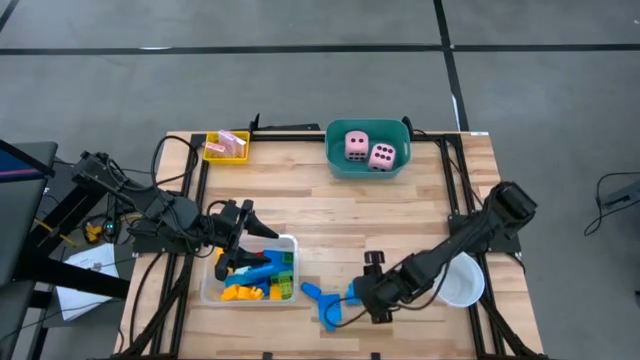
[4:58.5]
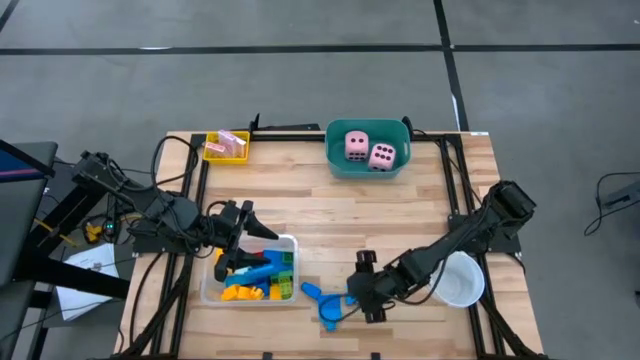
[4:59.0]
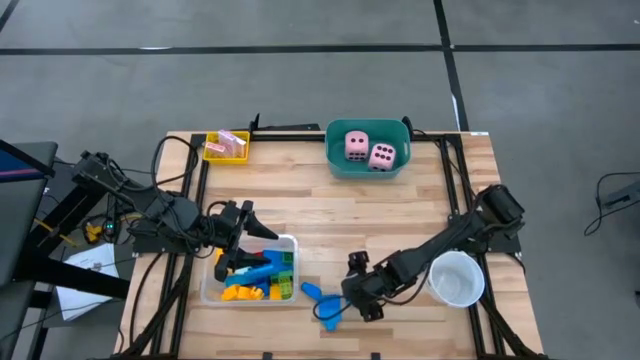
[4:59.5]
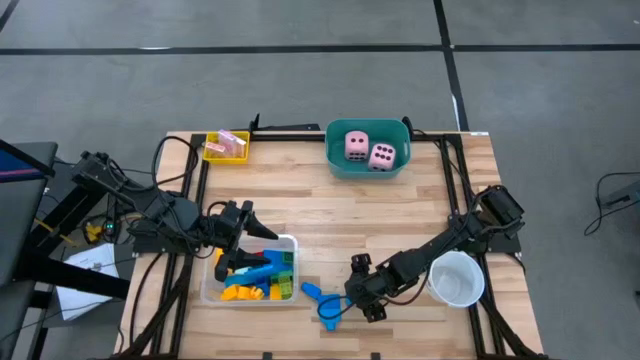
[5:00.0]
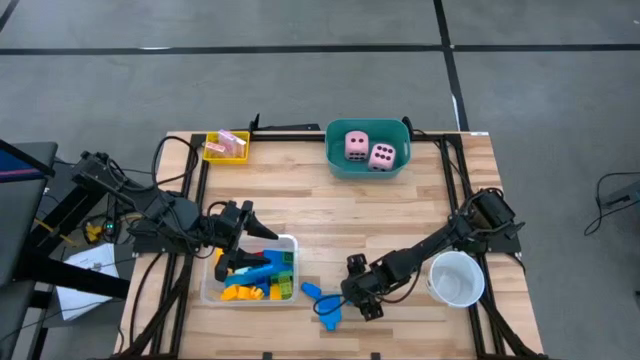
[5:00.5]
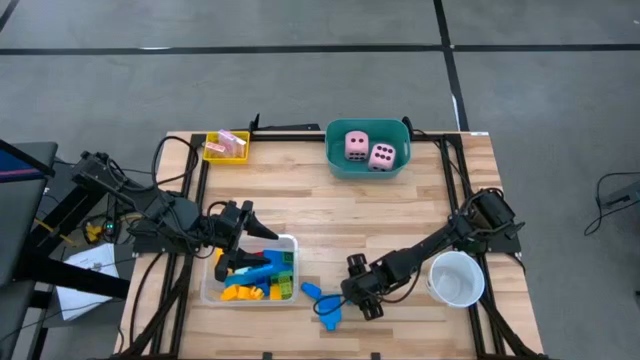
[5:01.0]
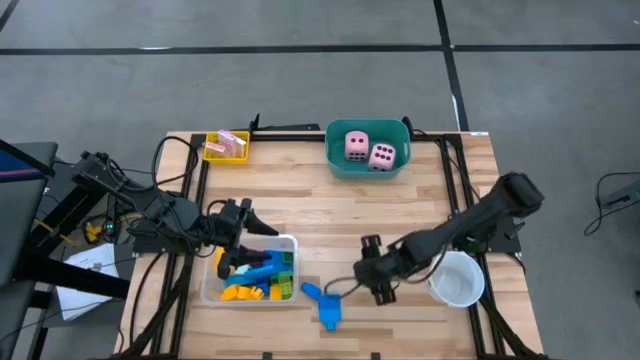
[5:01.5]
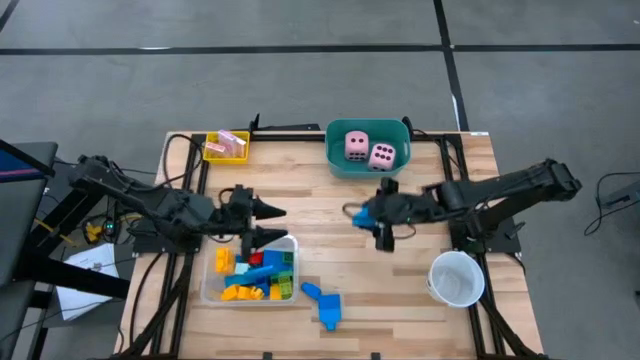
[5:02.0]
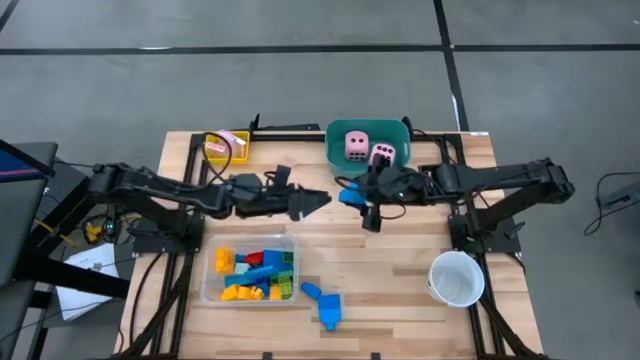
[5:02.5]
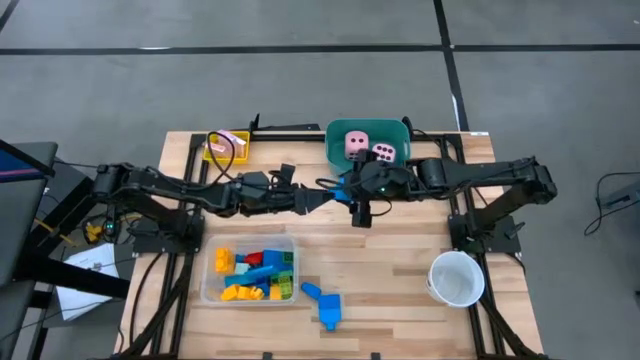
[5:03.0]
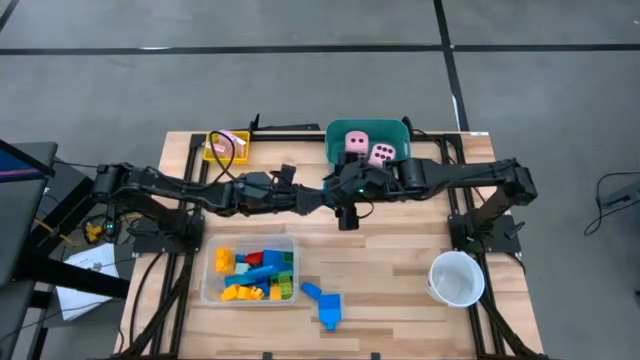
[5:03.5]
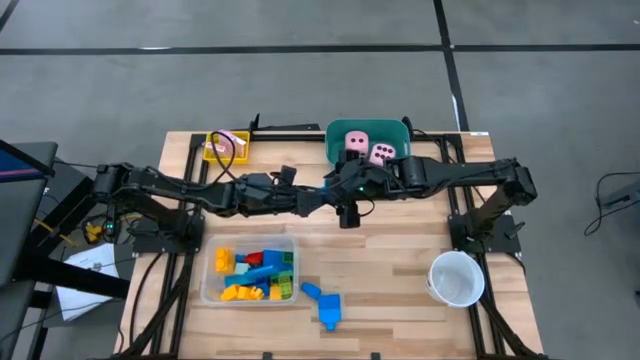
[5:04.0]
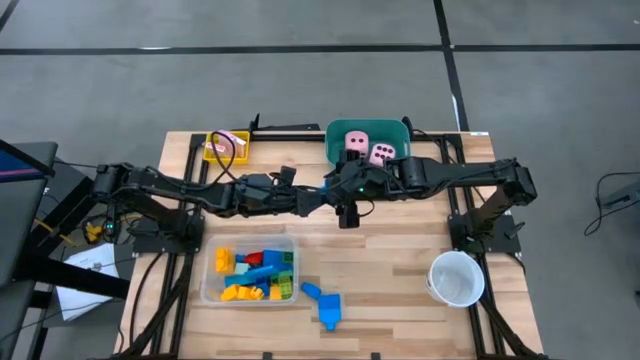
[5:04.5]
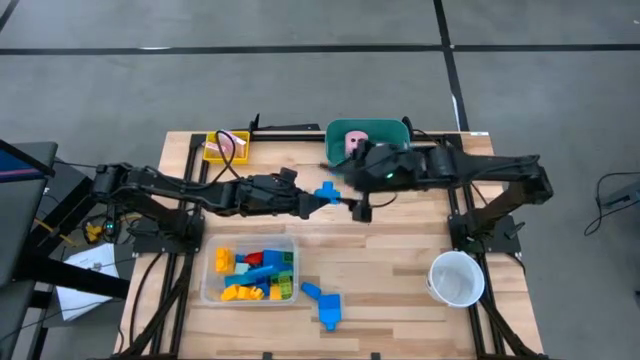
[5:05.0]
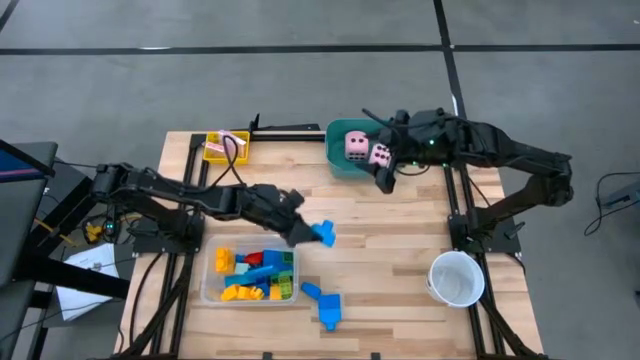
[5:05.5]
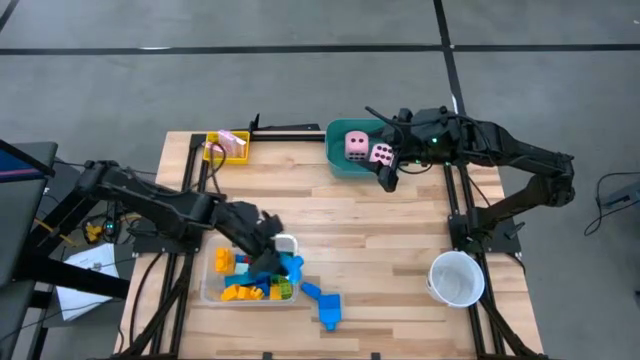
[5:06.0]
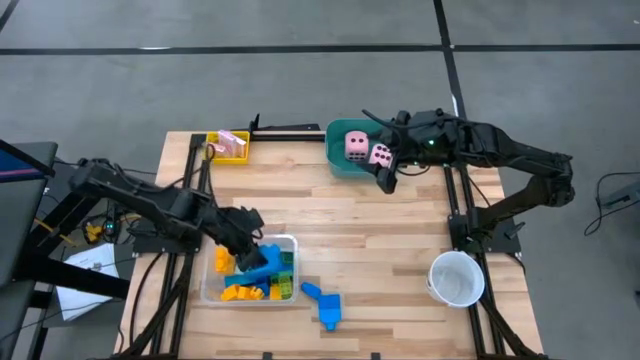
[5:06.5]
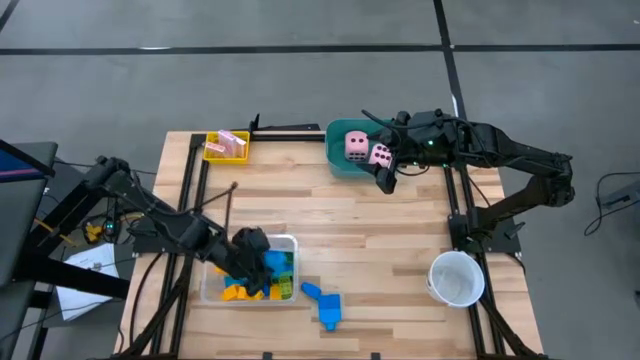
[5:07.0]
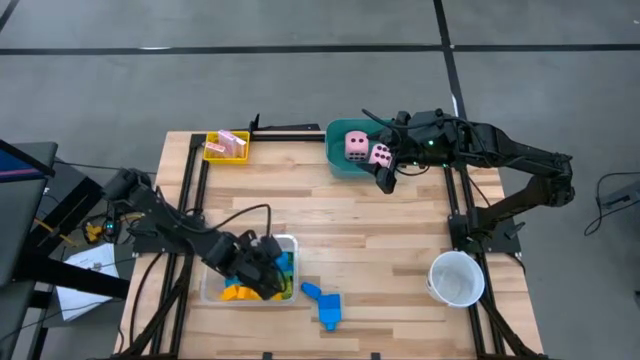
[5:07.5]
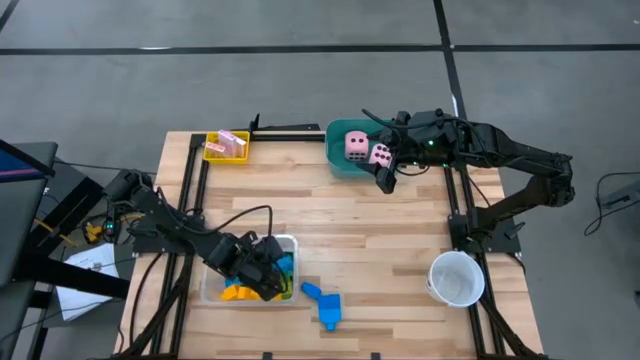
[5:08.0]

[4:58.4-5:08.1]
Task: Pick & Place Toys
Put the blue game piece into the transparent bin

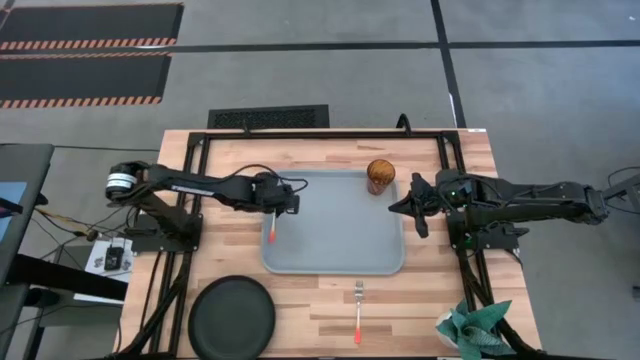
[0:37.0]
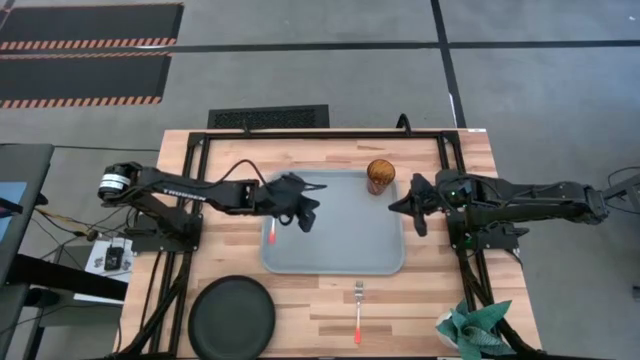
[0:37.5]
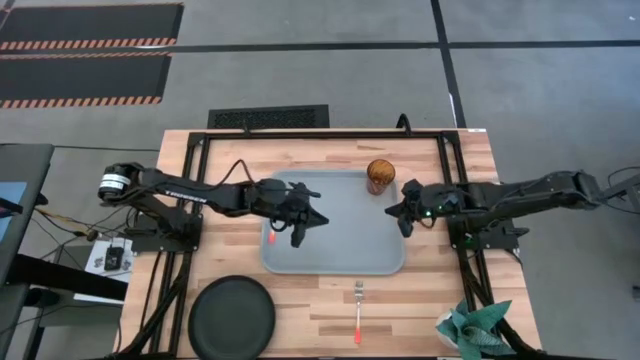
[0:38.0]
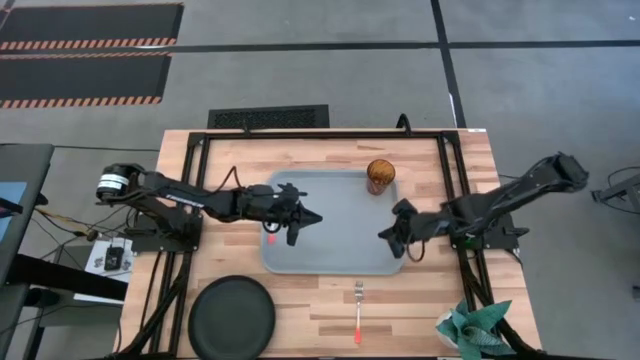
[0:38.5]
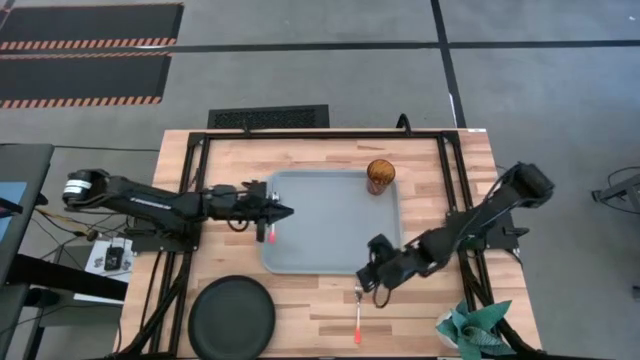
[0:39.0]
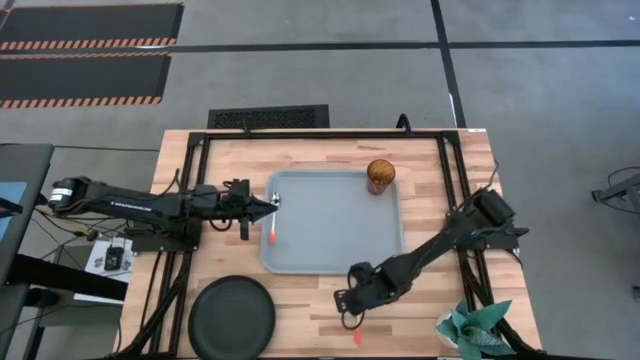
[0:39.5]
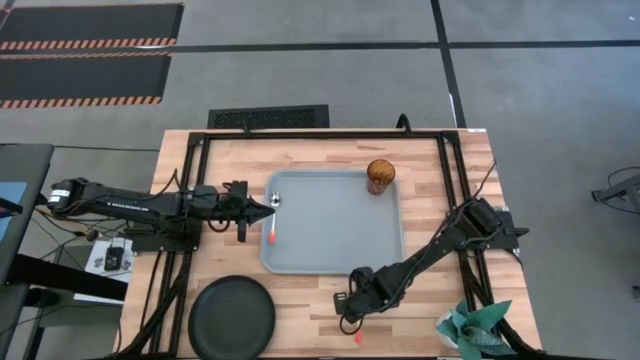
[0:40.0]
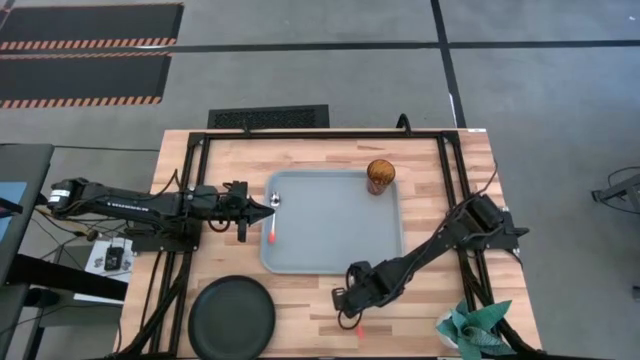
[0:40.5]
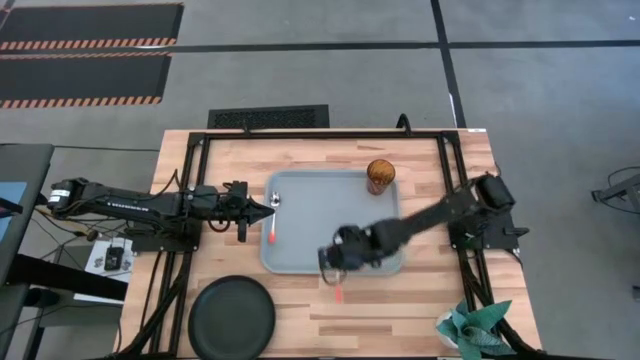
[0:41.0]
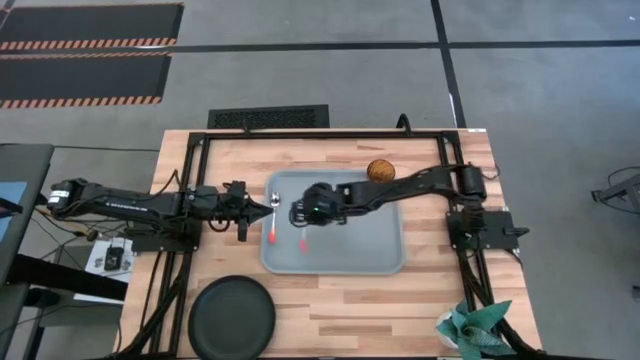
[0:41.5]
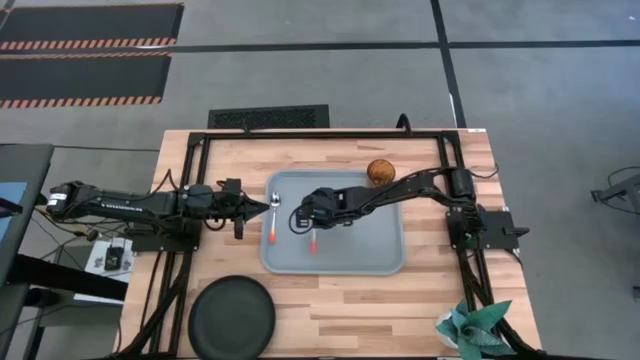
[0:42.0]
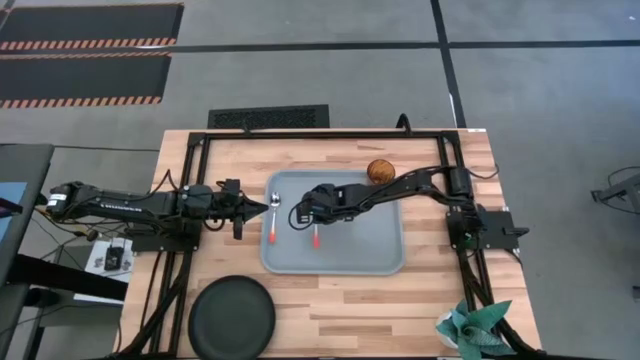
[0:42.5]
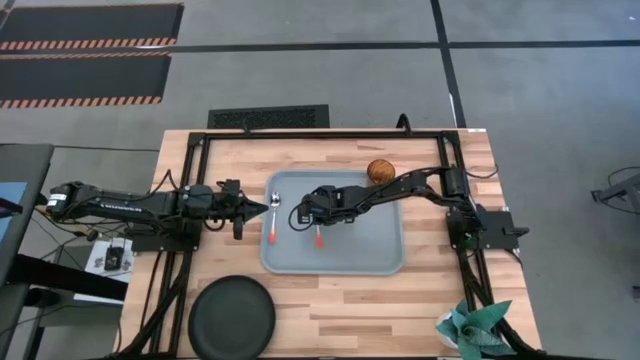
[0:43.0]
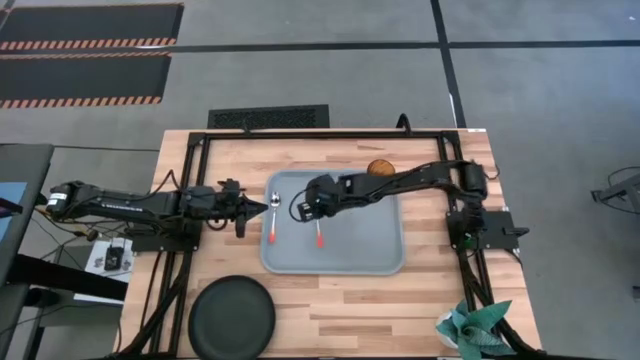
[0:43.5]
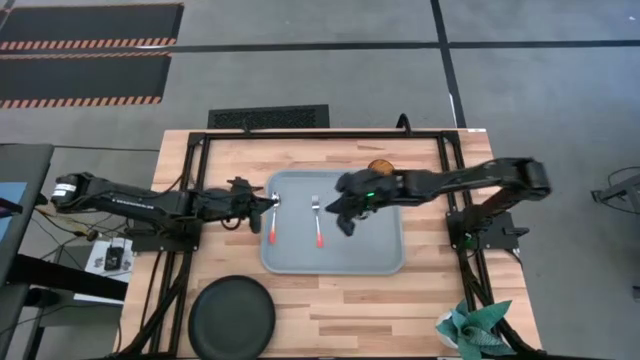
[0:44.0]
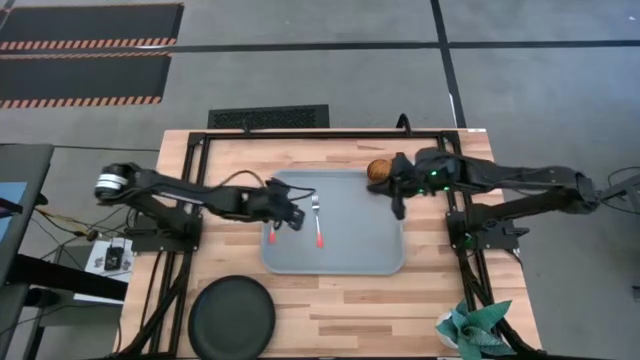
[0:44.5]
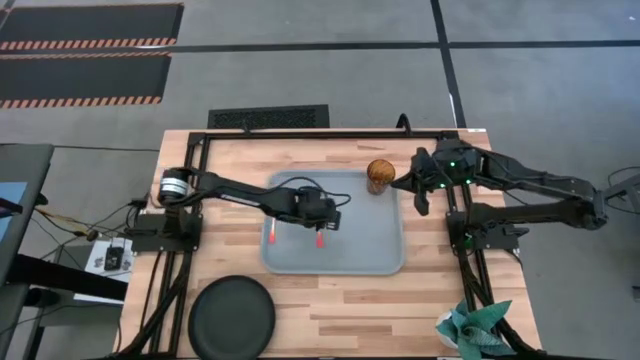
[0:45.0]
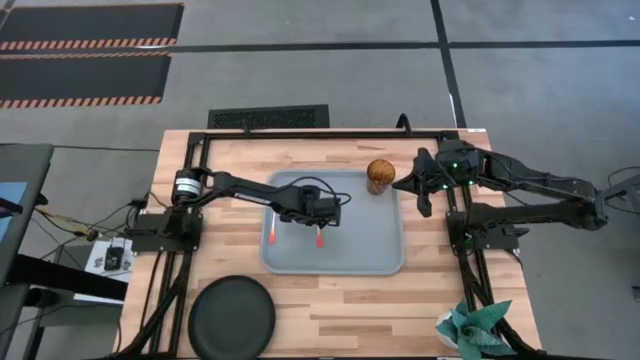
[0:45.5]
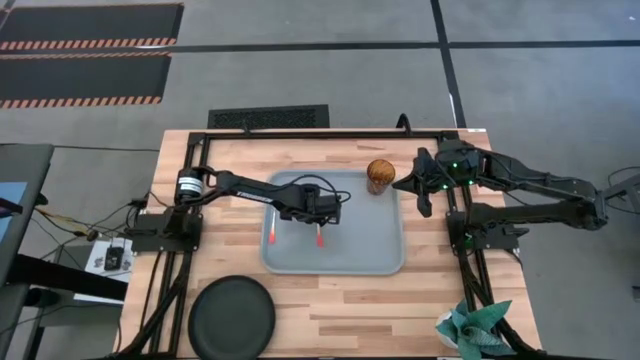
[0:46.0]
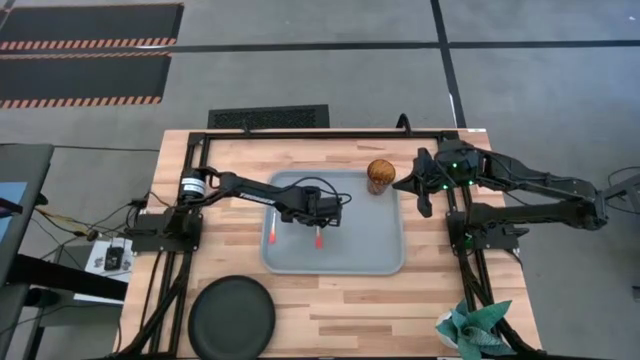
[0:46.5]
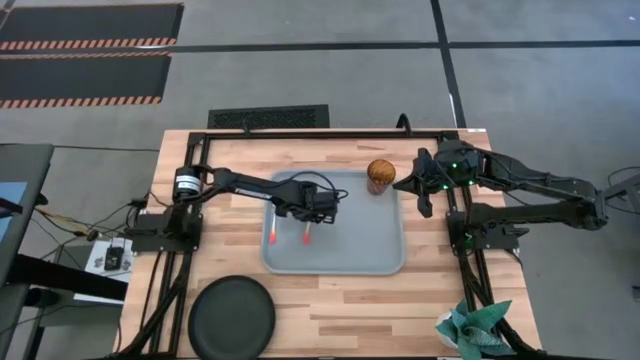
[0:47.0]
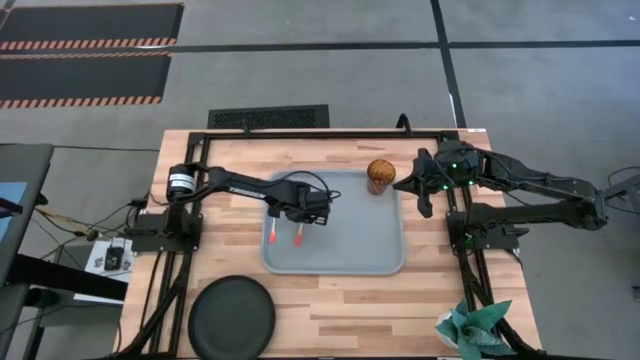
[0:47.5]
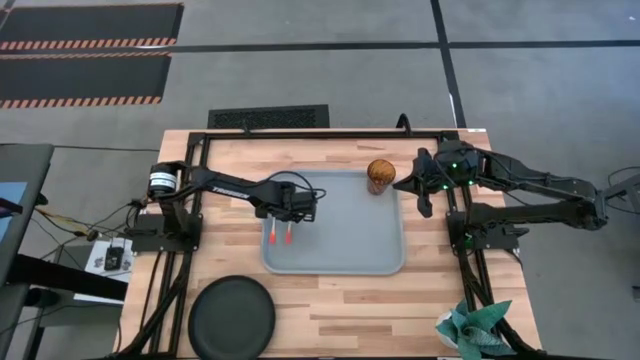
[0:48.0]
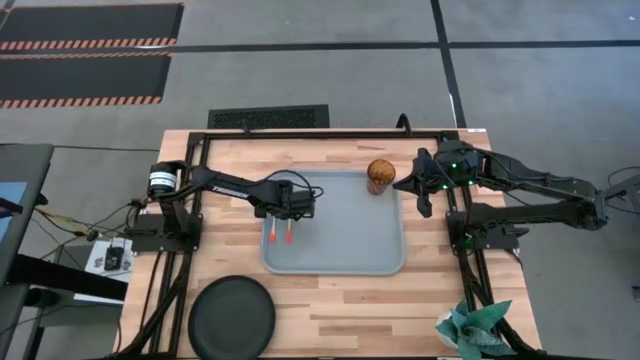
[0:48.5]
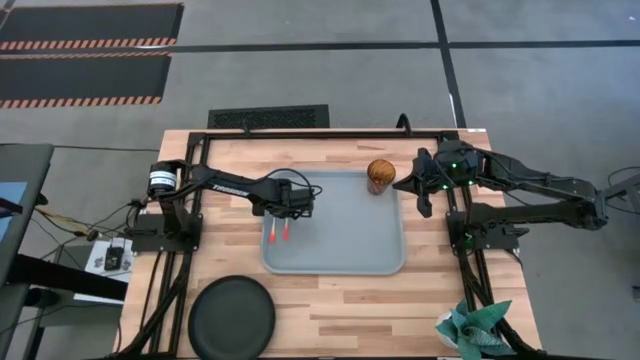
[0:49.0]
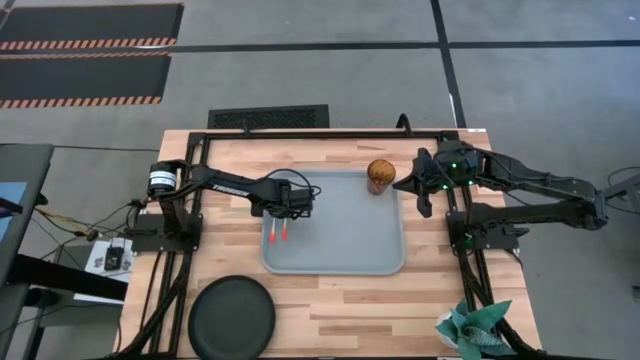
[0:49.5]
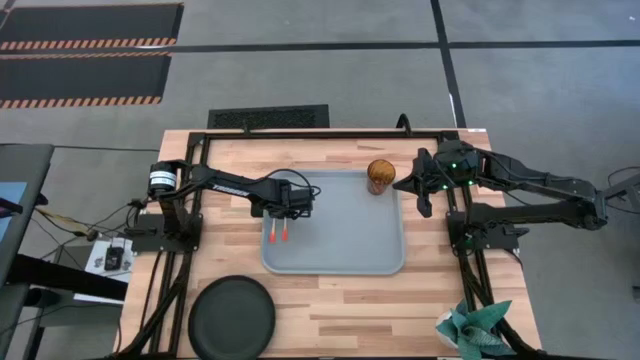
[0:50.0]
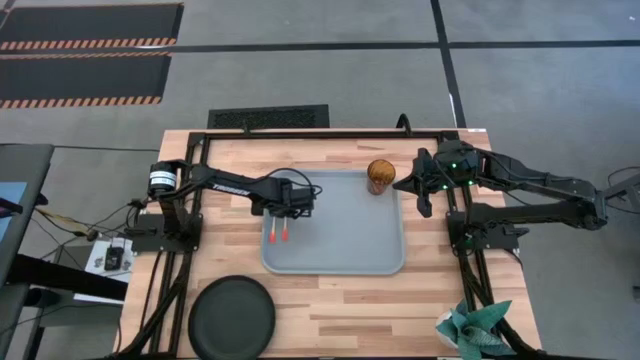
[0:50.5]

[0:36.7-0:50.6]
Task: Pick and place plate/cup/fork/spoon on tray
Put the orange fork on the gray serving tray to the right of the orange spoon
